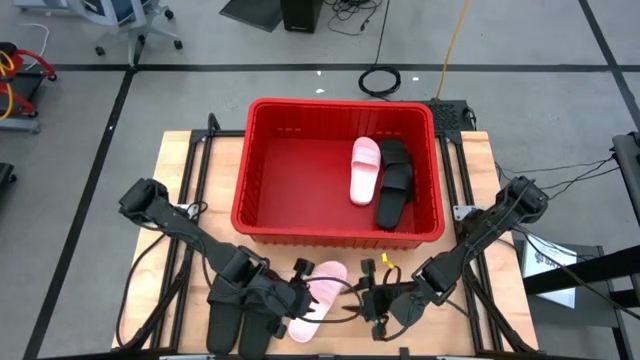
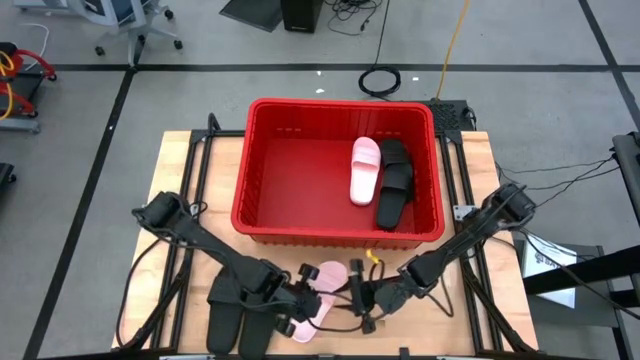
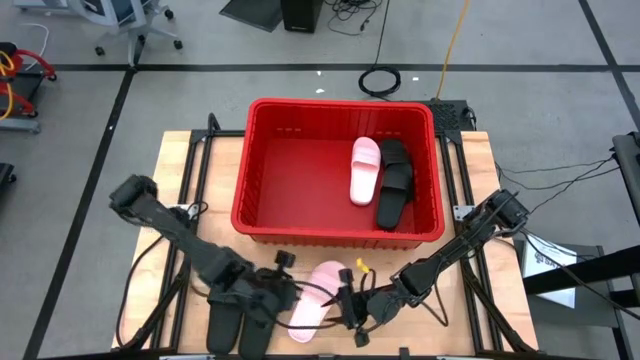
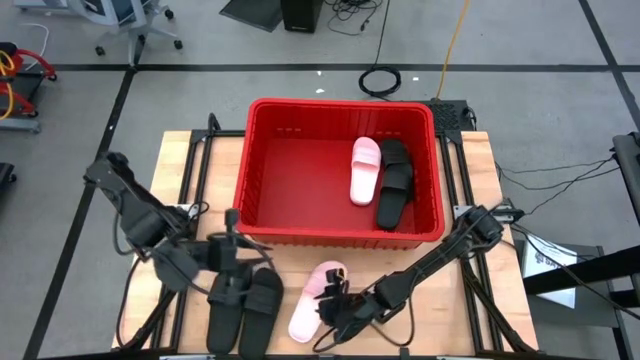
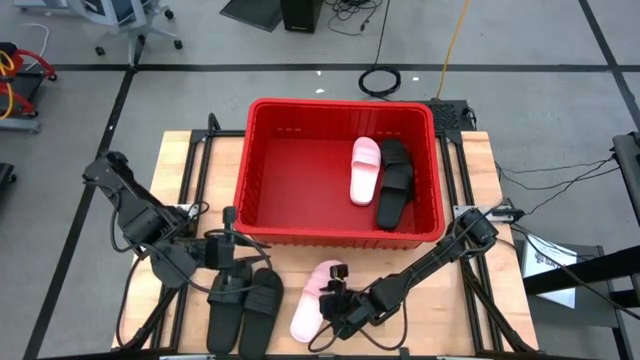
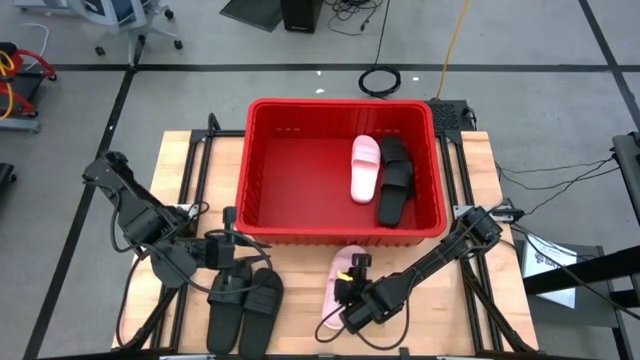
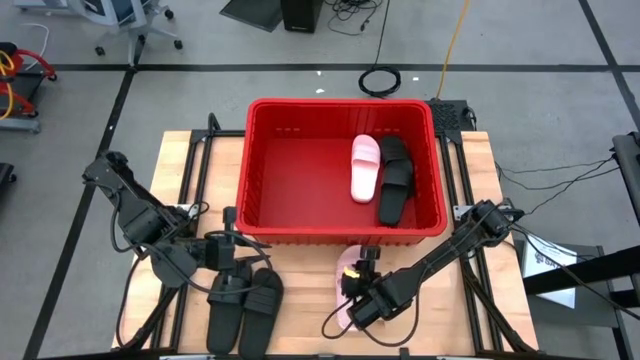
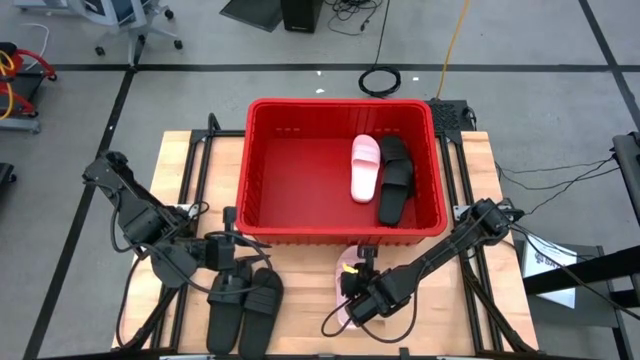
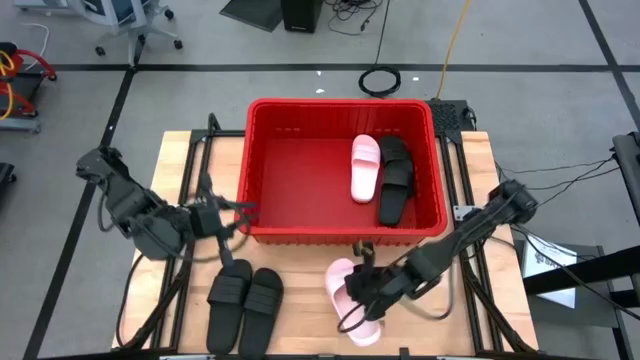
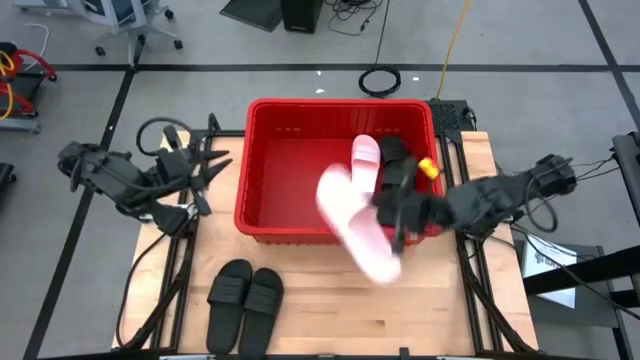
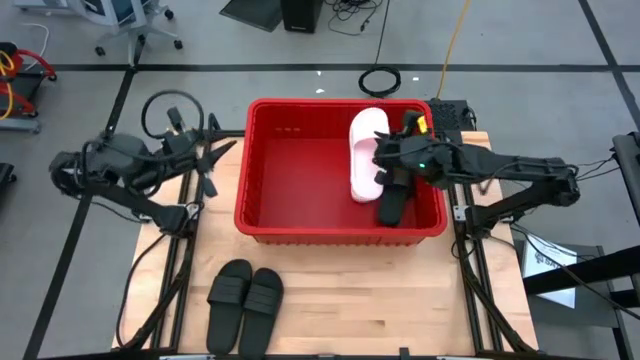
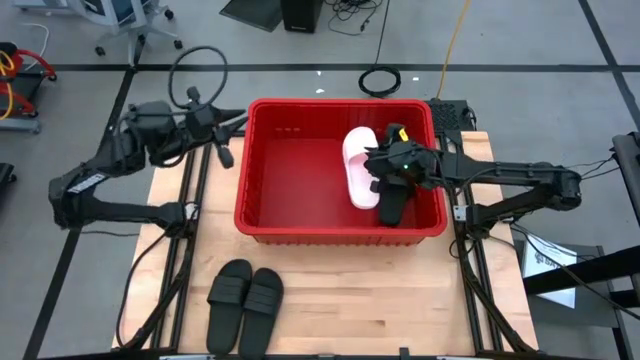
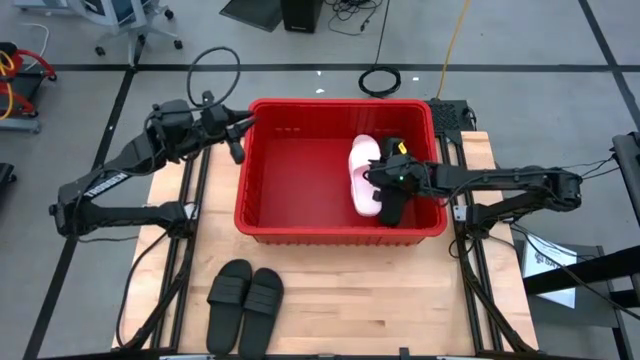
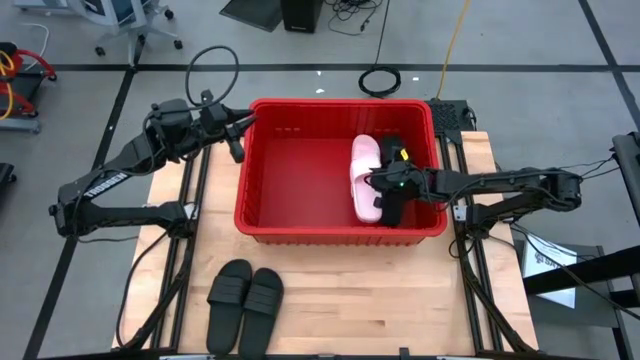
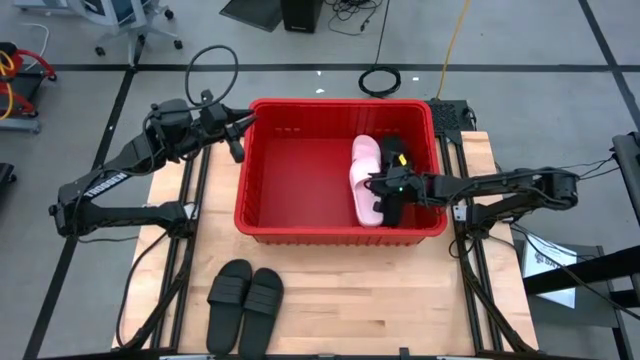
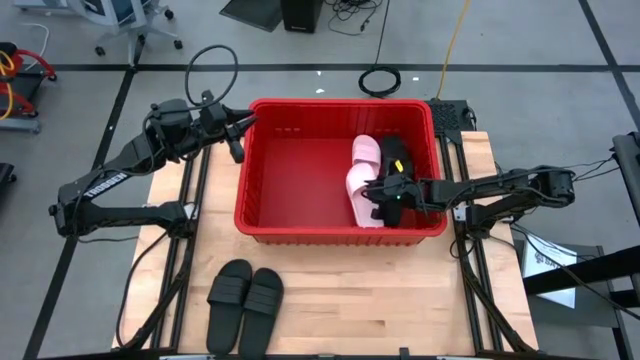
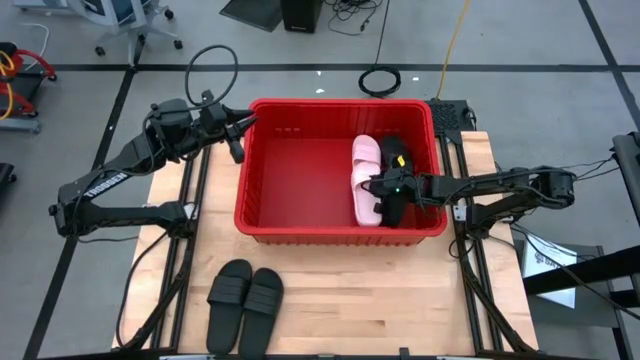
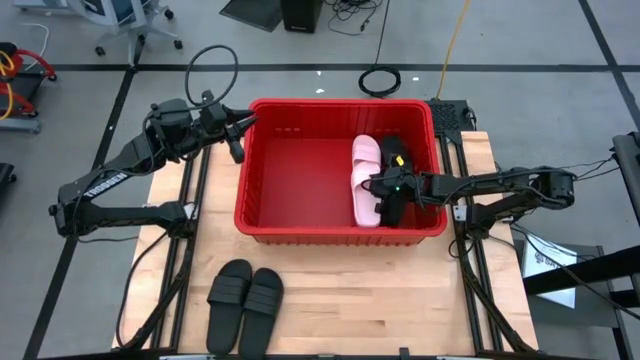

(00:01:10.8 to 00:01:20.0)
Task: Pick and place slides into bin
Put the pink slide into the red bin

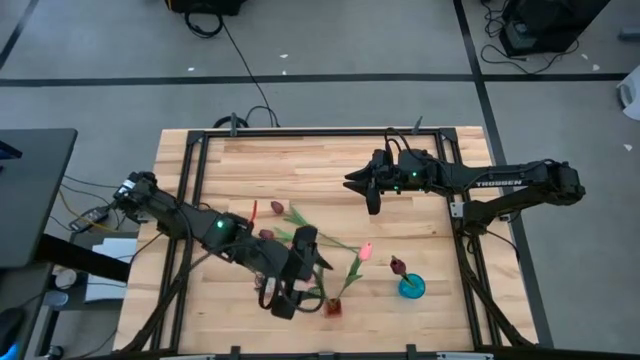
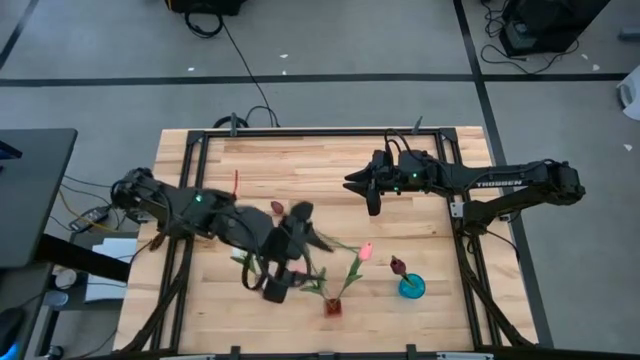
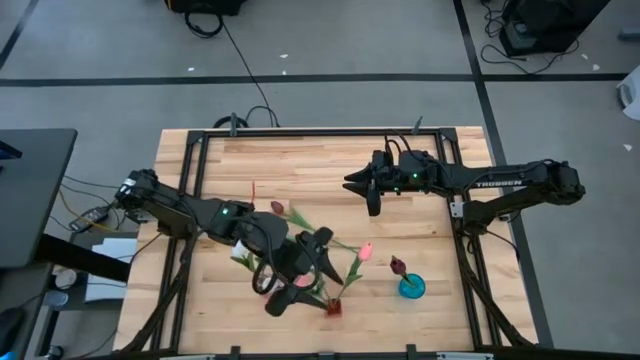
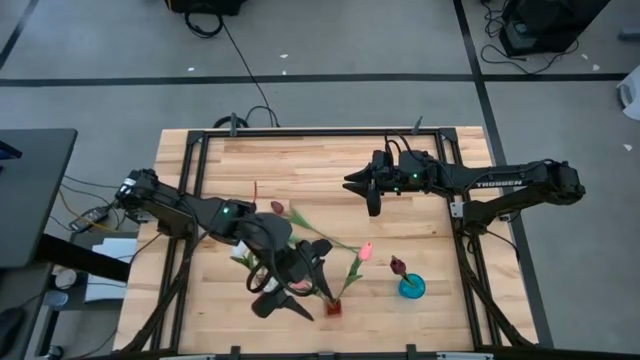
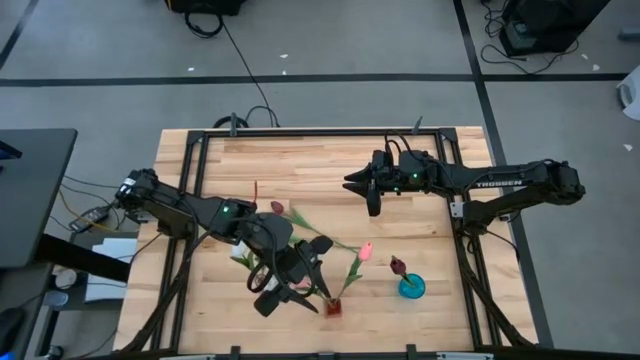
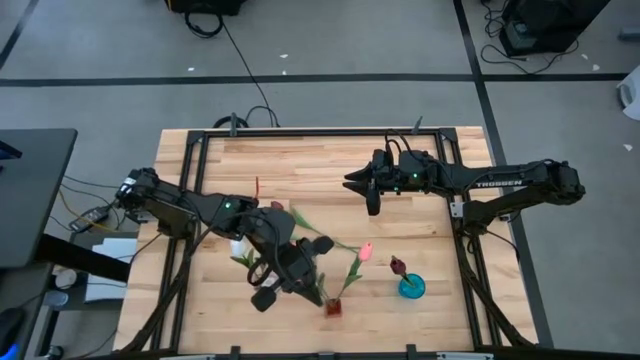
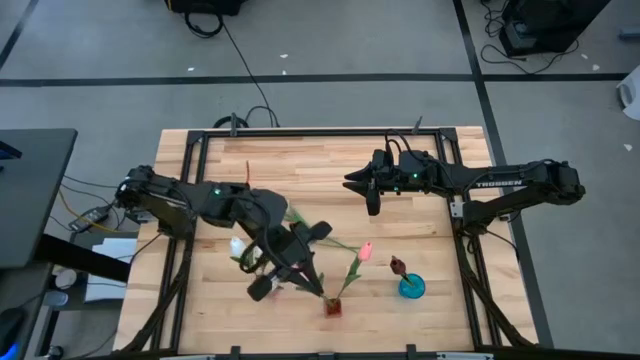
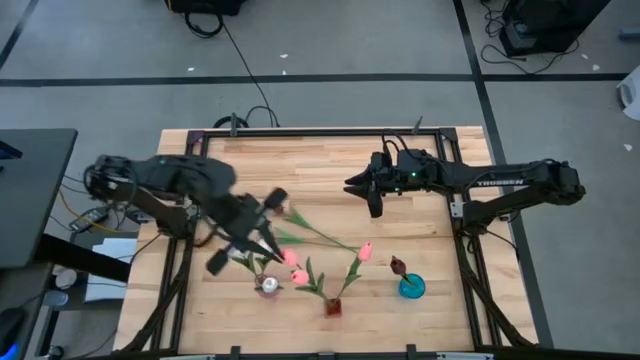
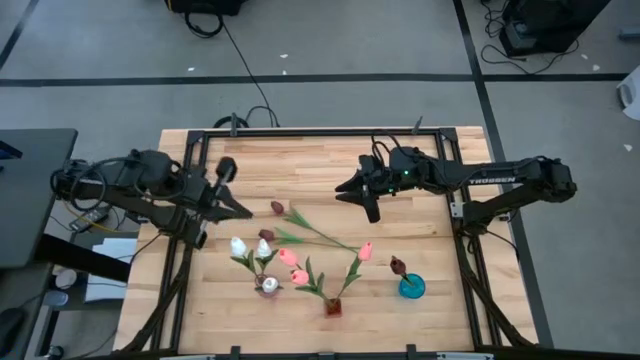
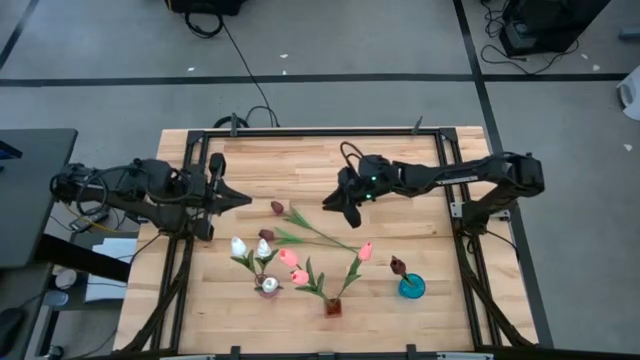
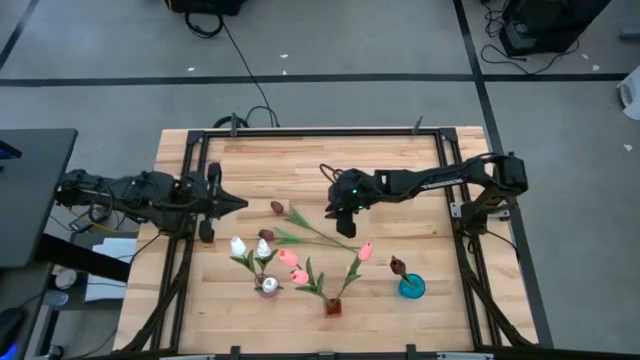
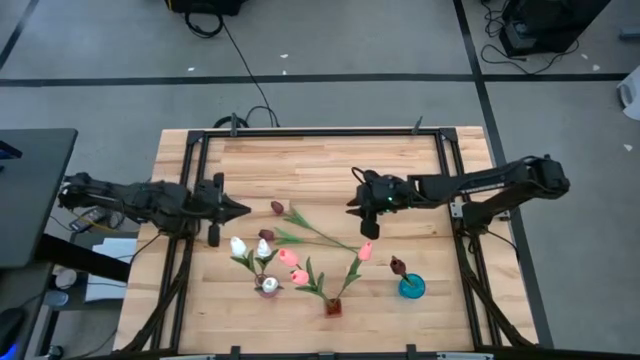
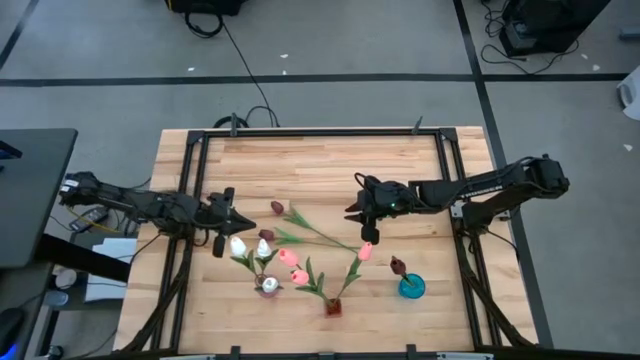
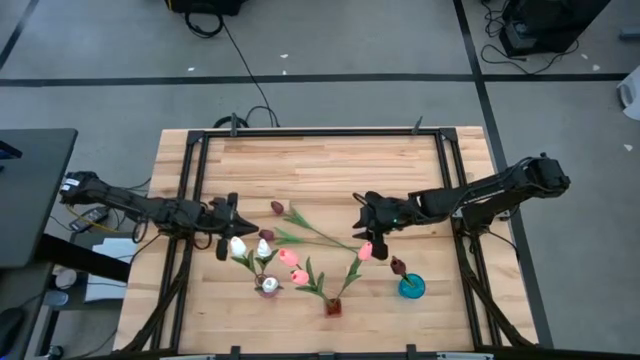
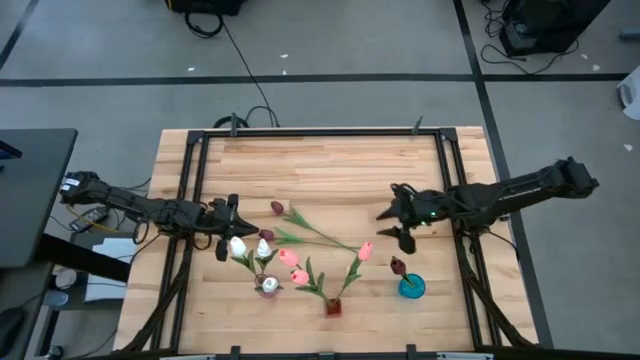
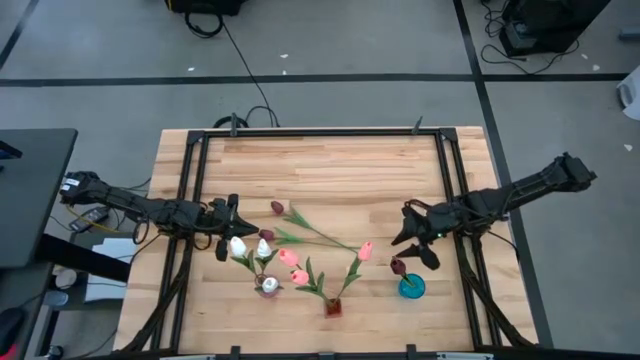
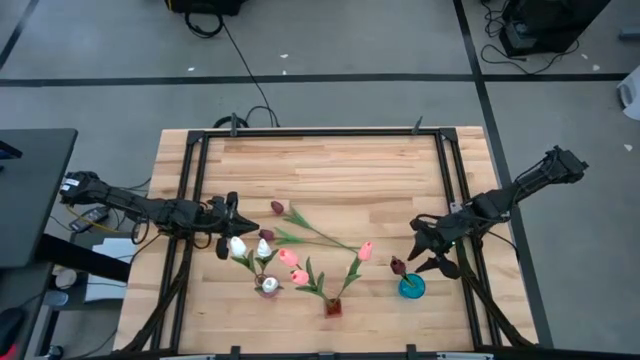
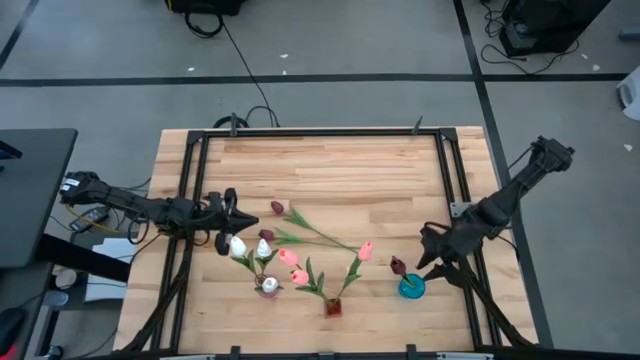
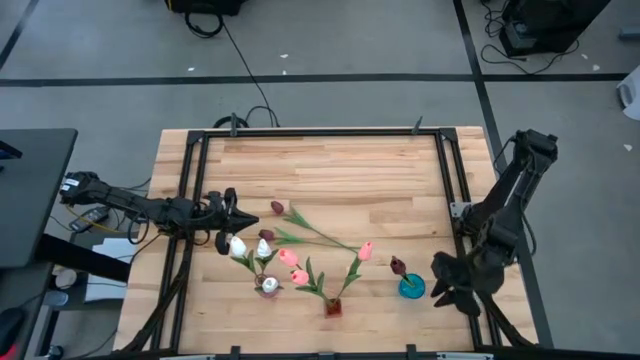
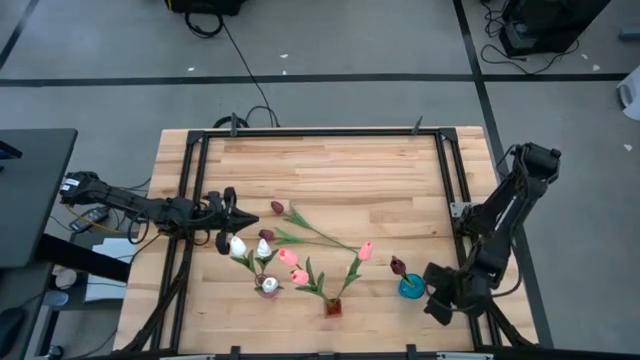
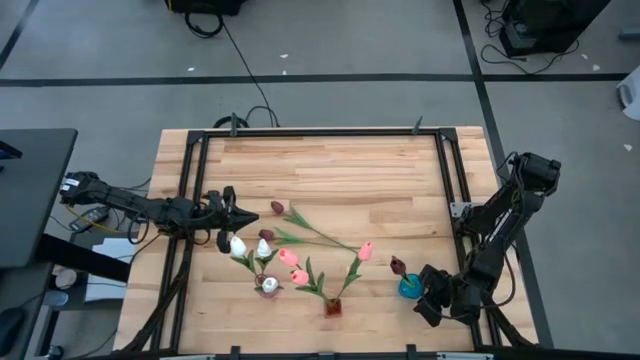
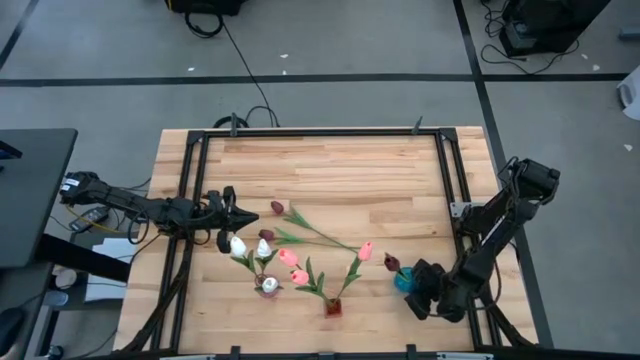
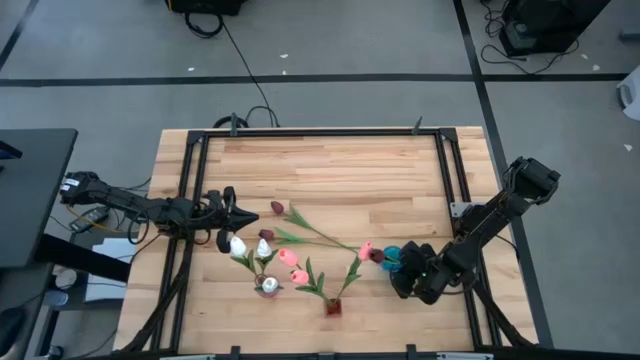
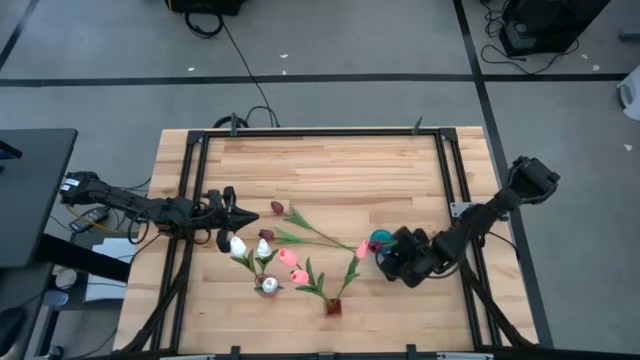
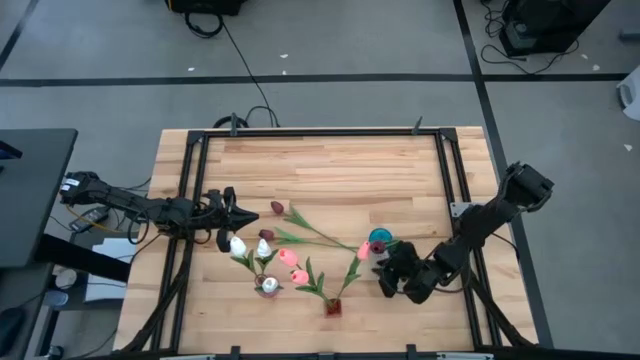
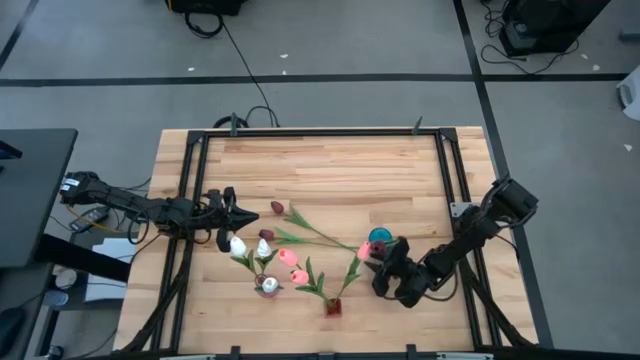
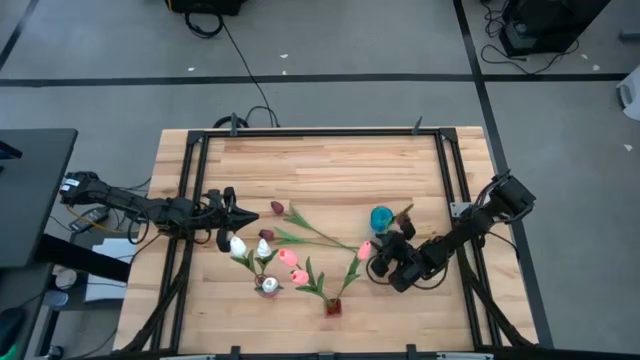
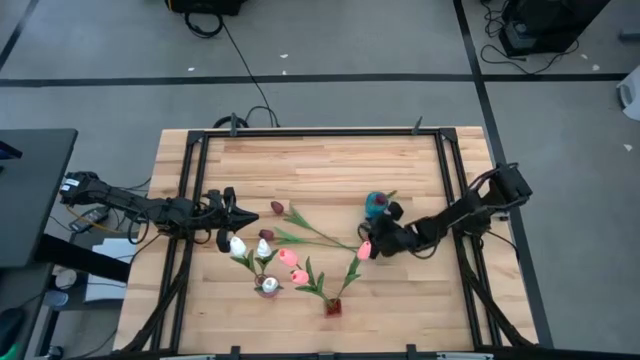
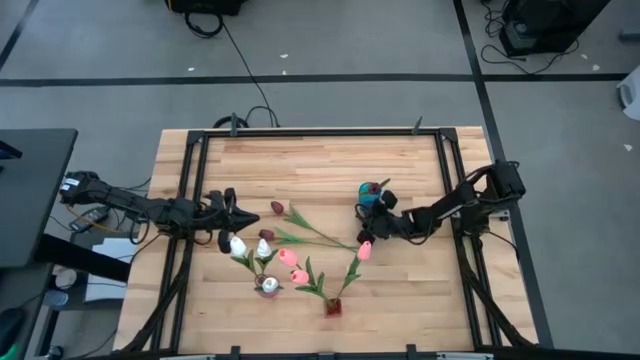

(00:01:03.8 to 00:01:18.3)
Task: Sort flowers into vase by color
Move the blue vase to the top right side of the table
